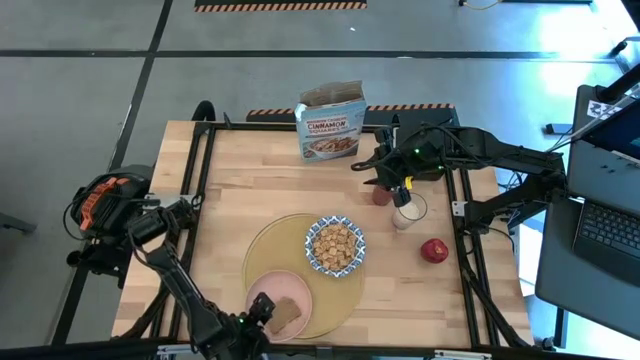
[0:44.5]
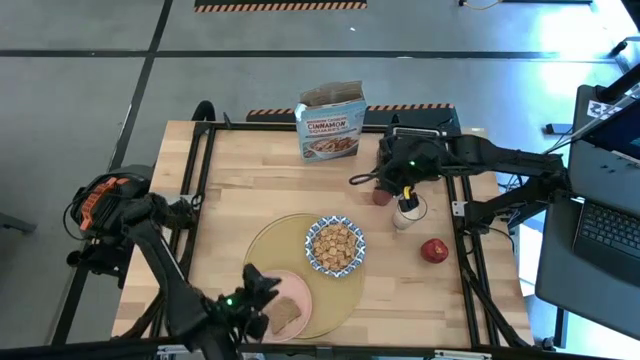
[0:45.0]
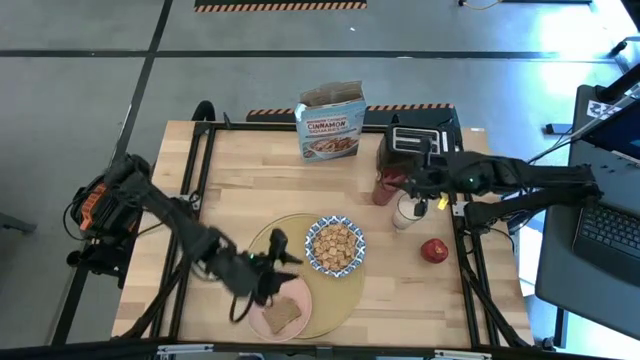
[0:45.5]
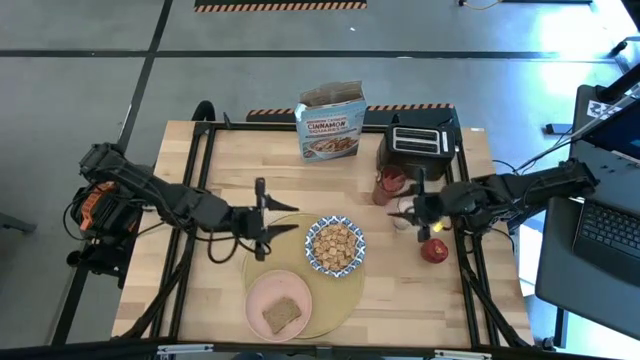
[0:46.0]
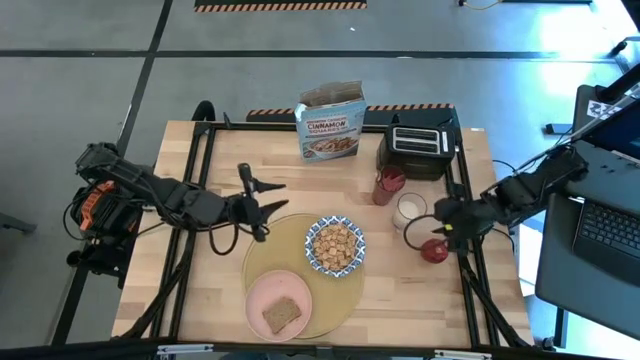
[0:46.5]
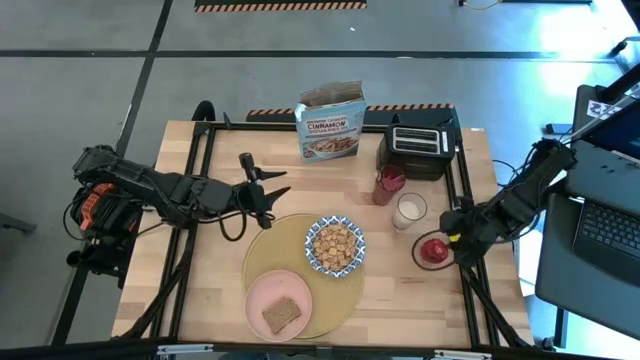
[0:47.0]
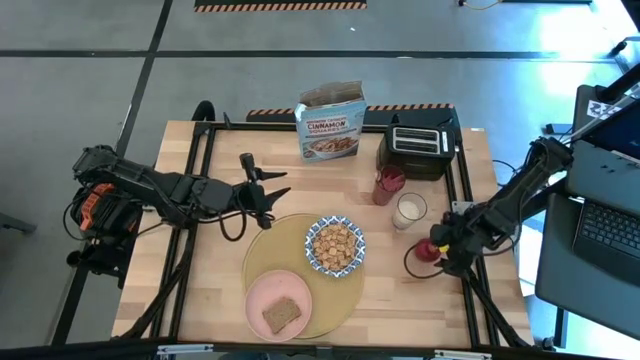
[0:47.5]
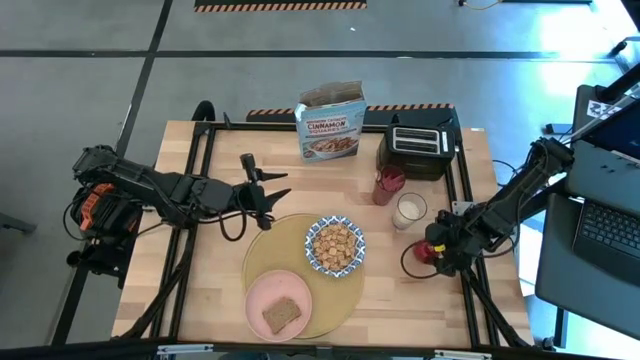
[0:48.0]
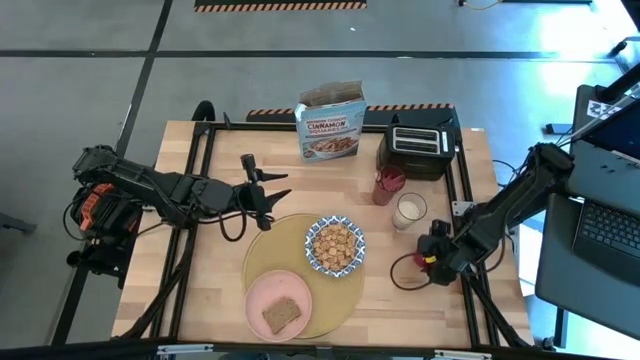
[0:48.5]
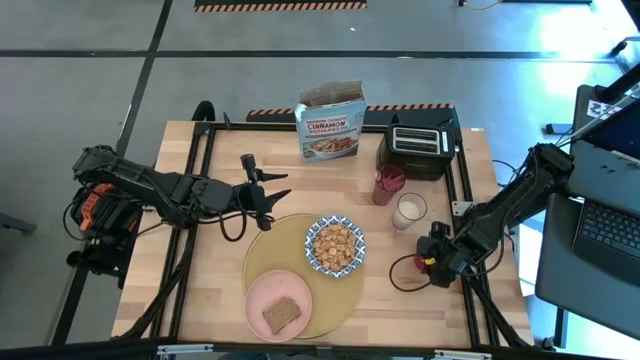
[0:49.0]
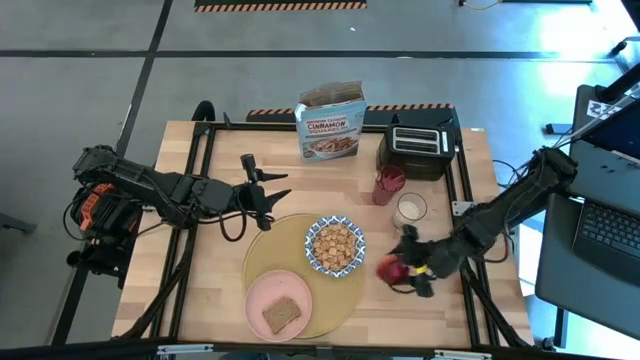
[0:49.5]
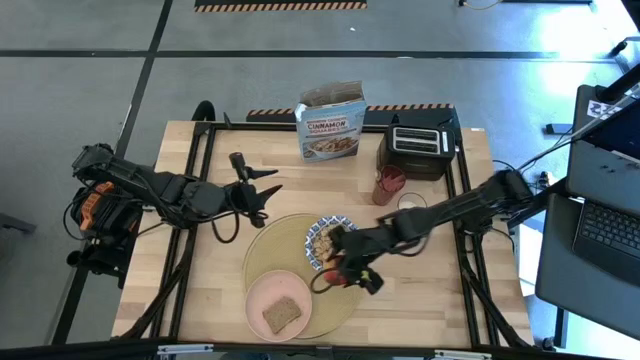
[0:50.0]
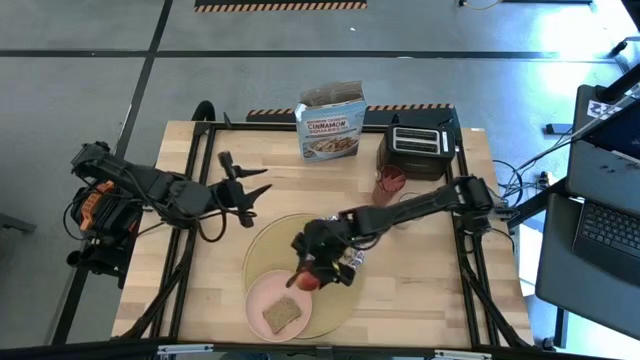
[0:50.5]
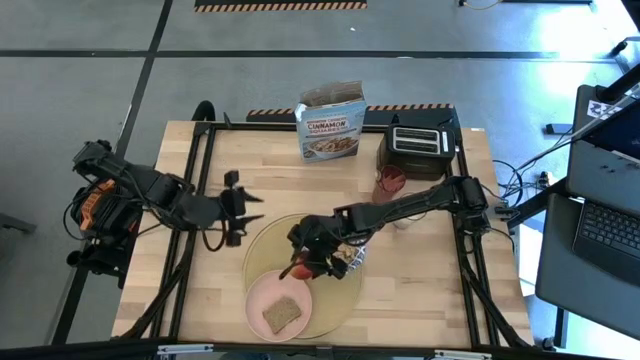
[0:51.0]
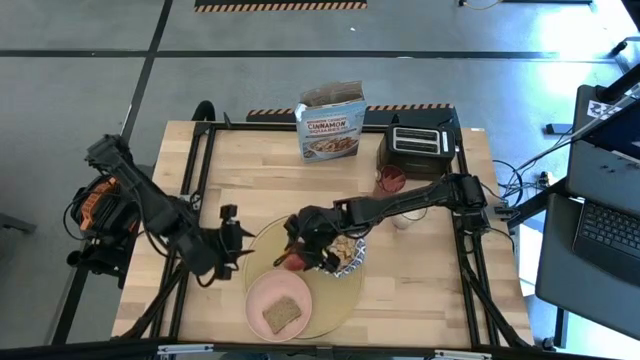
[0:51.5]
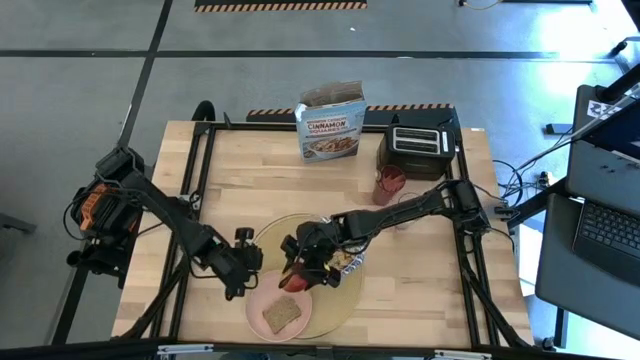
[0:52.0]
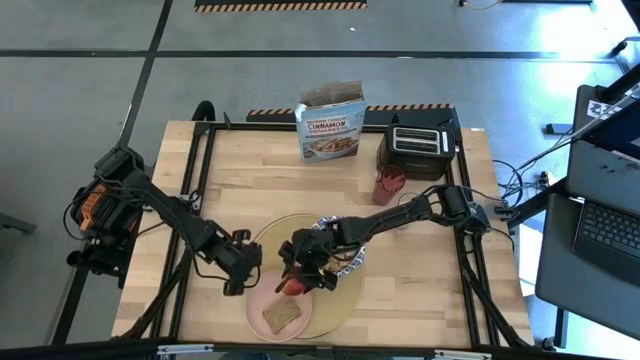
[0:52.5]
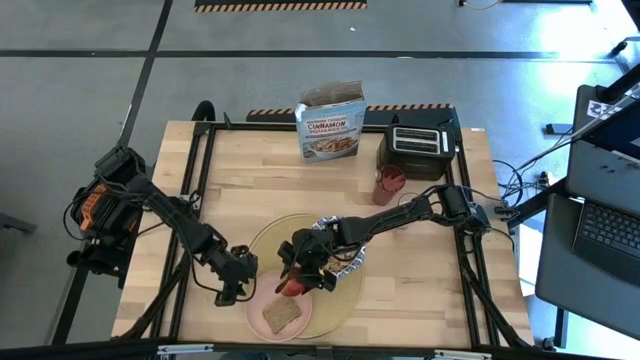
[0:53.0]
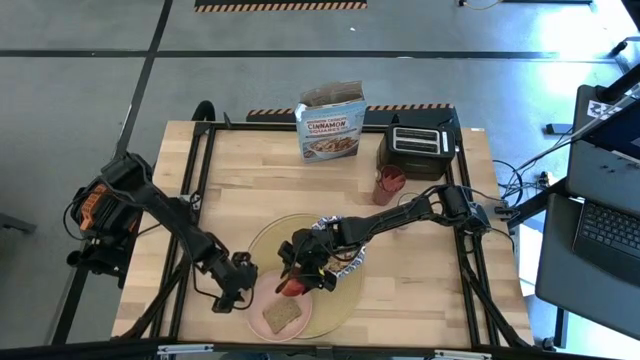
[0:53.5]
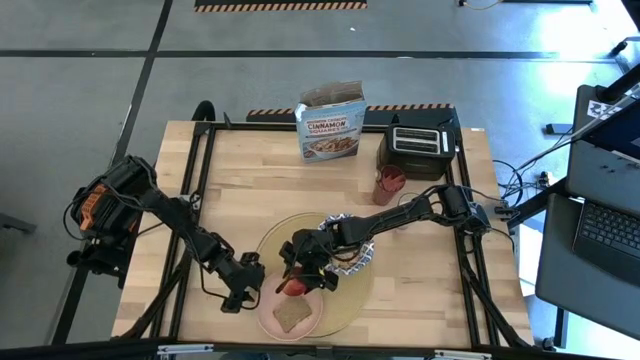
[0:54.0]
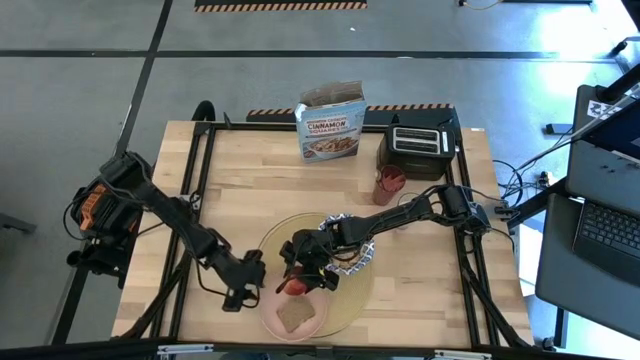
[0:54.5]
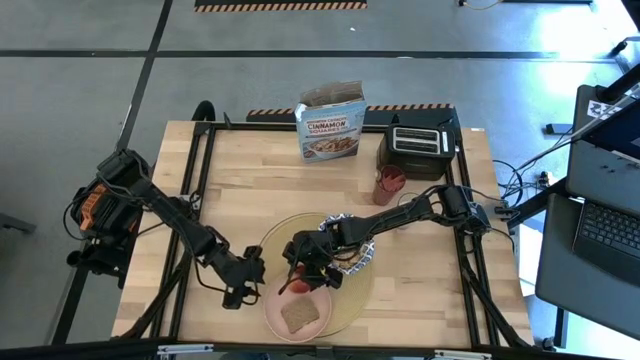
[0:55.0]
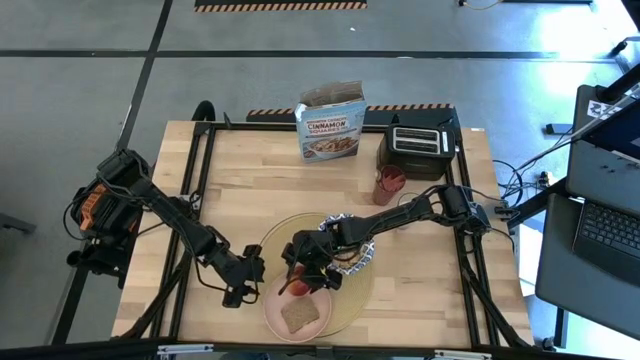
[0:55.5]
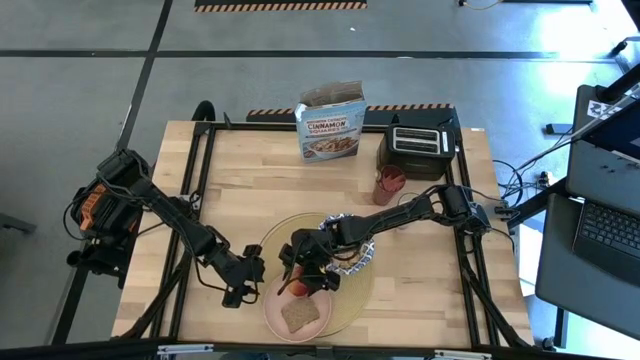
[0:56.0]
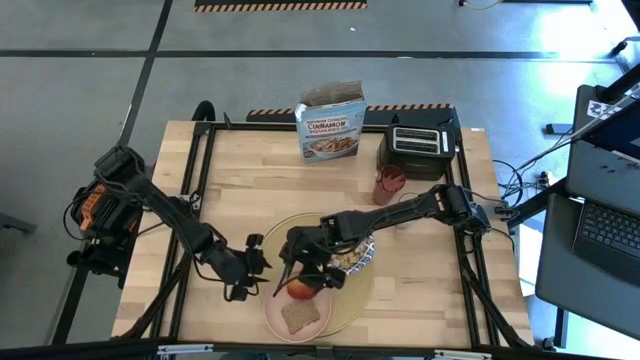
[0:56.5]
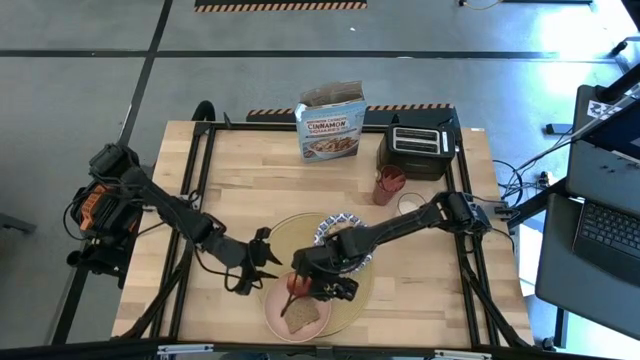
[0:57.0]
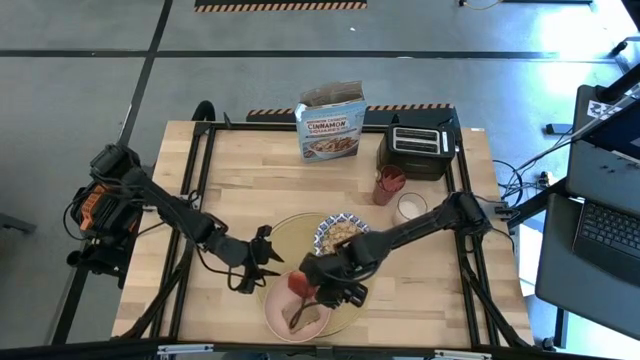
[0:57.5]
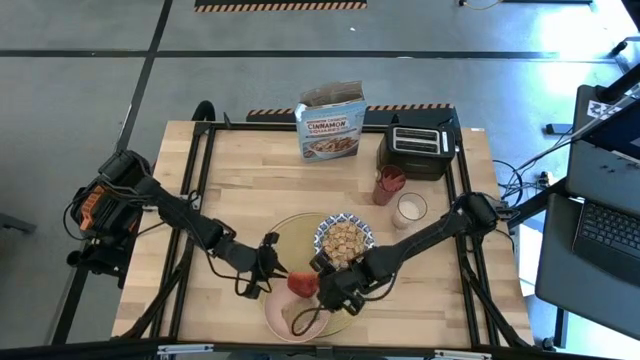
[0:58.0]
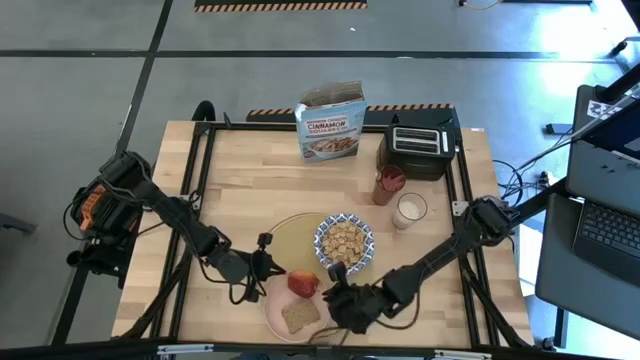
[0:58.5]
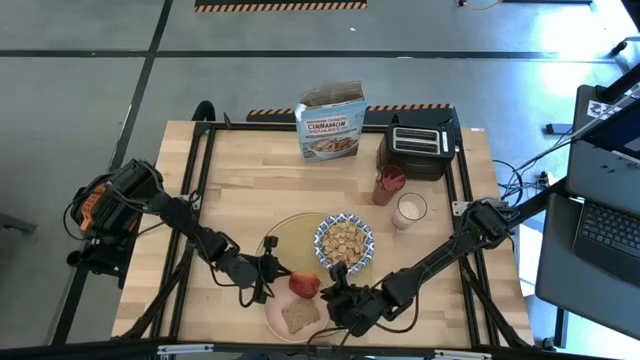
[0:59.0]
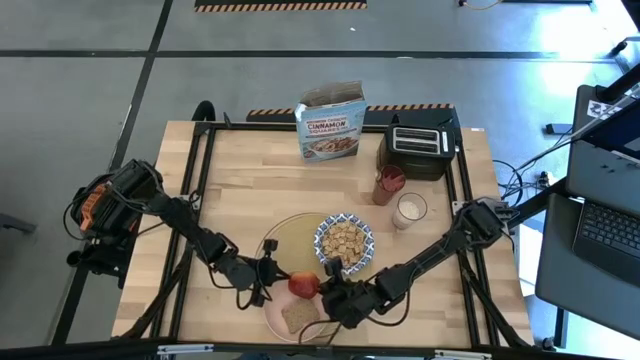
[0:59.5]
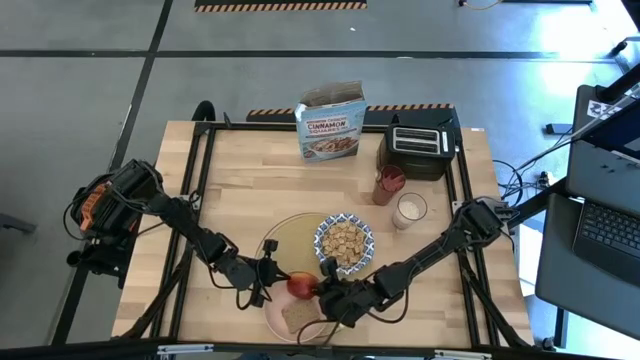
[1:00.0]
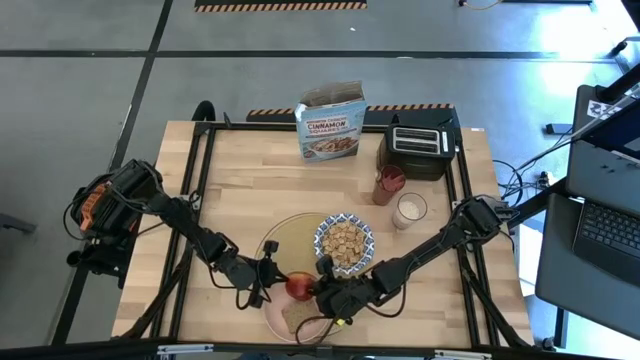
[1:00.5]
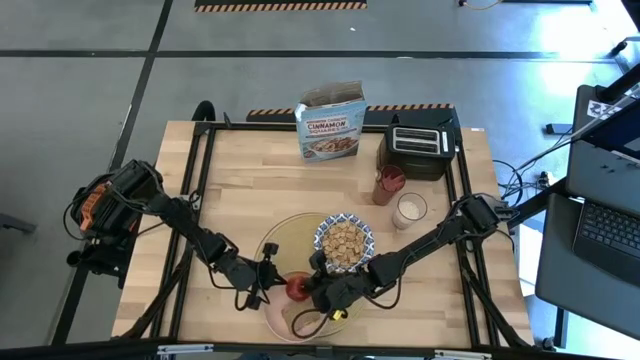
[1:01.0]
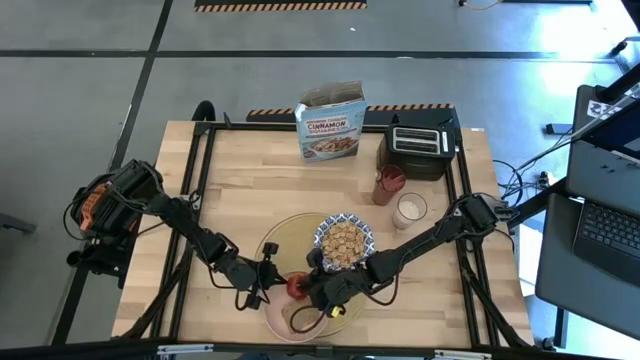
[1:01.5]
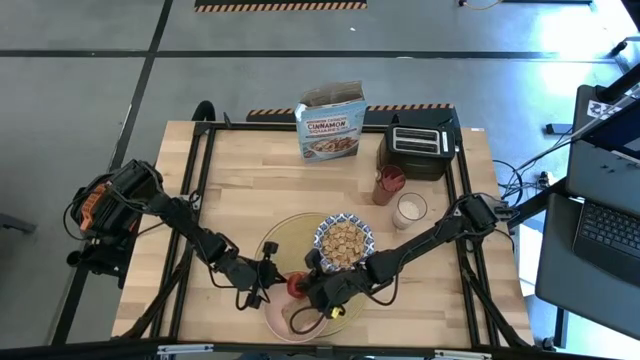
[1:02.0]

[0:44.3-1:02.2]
Task: Arrange a breakfast setting
Put the apple on the pink plate

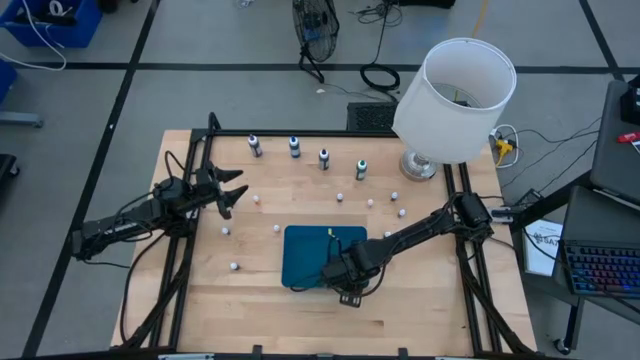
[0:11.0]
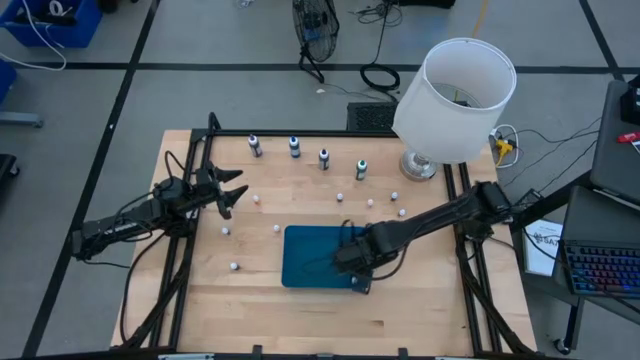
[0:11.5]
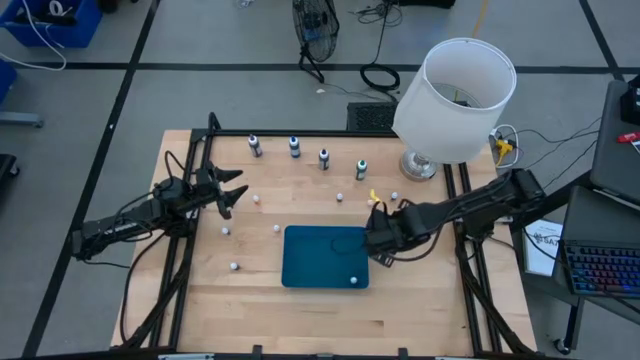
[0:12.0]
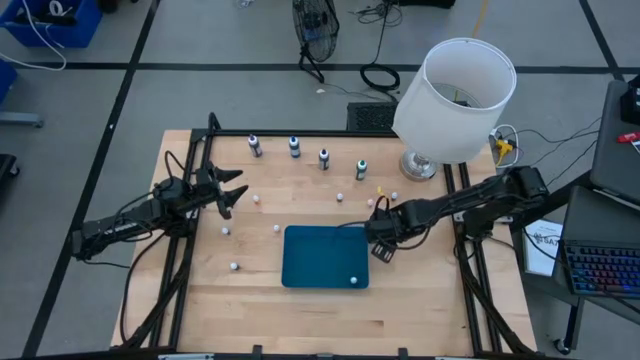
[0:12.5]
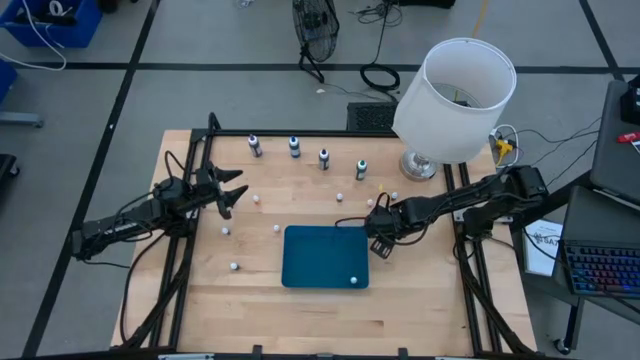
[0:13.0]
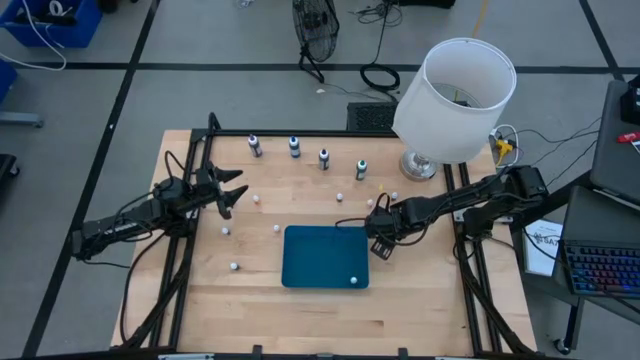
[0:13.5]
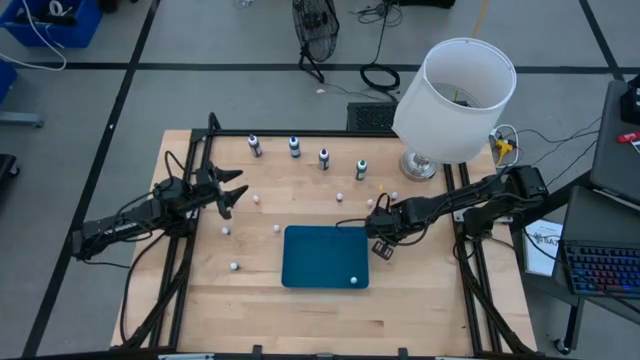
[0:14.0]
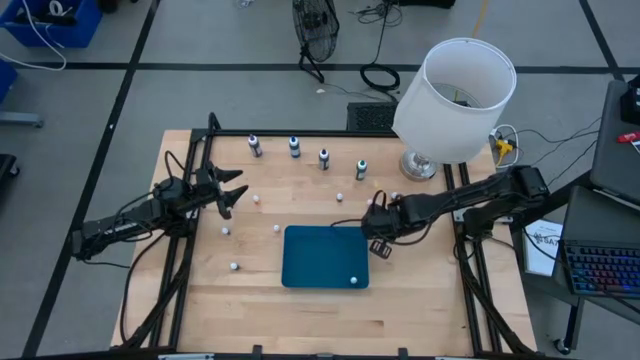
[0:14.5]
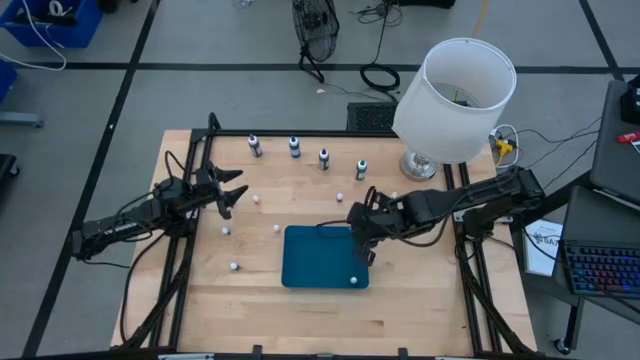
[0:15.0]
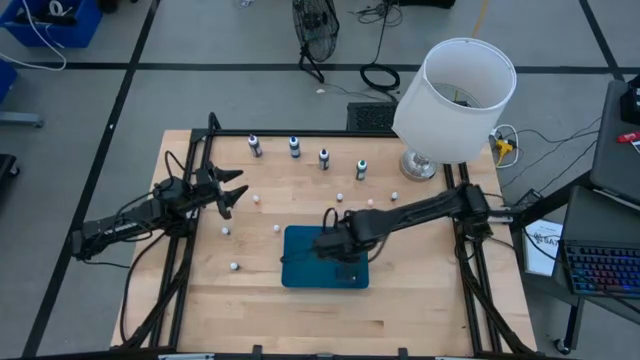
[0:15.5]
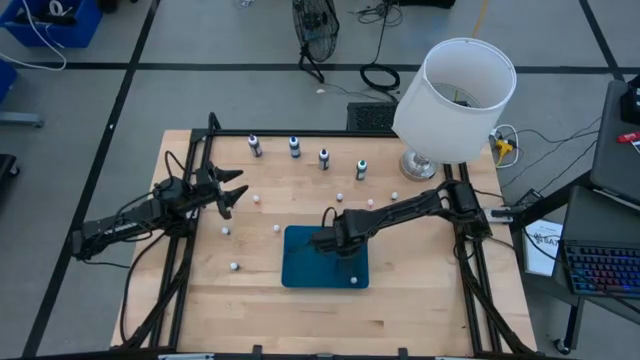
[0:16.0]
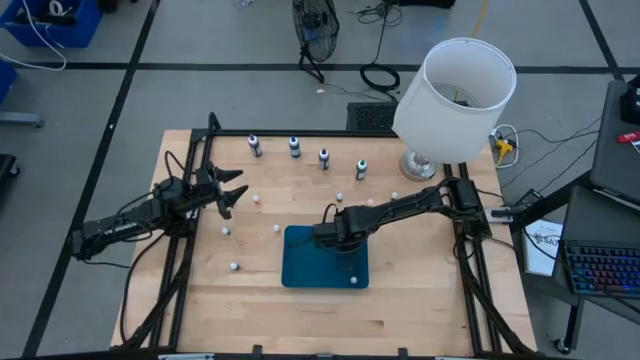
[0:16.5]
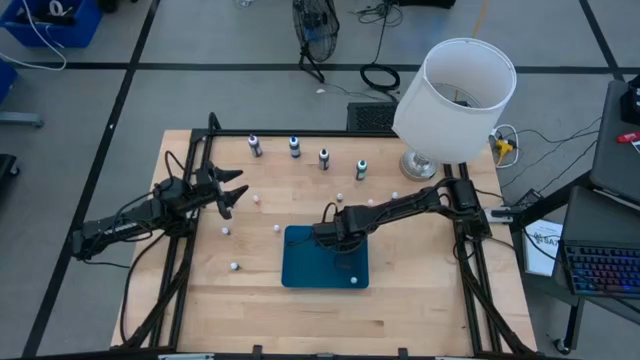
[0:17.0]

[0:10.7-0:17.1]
Task: Pick & Place food coloring
Put the right small red food coloring bottle into the blue bin
